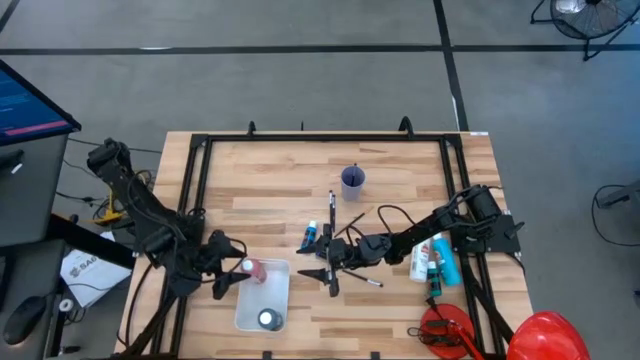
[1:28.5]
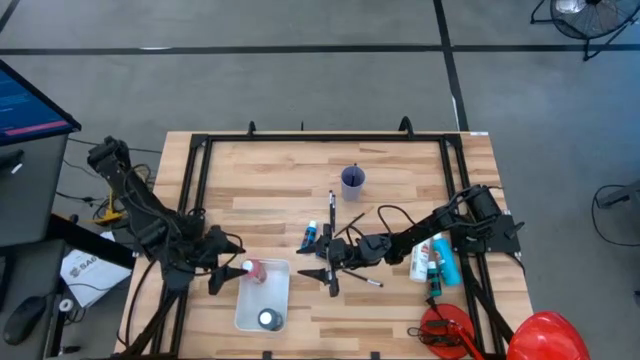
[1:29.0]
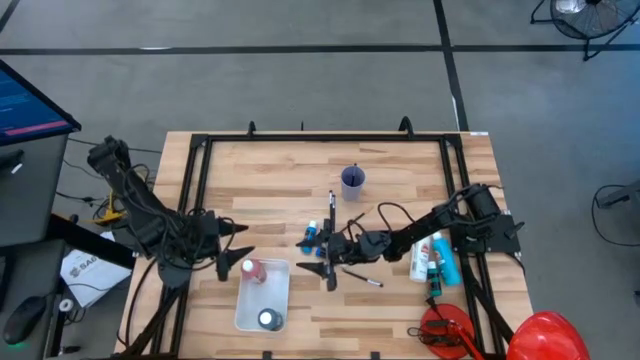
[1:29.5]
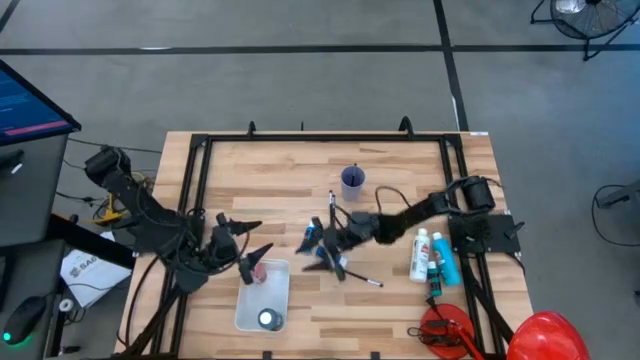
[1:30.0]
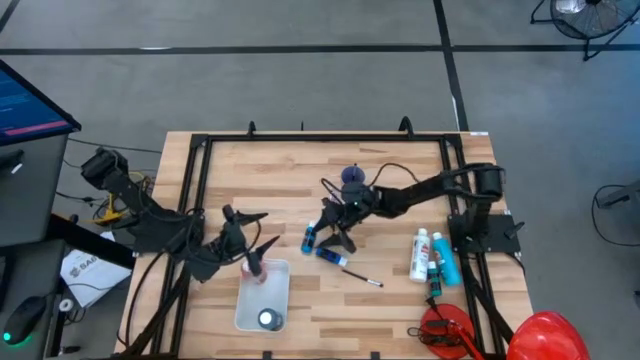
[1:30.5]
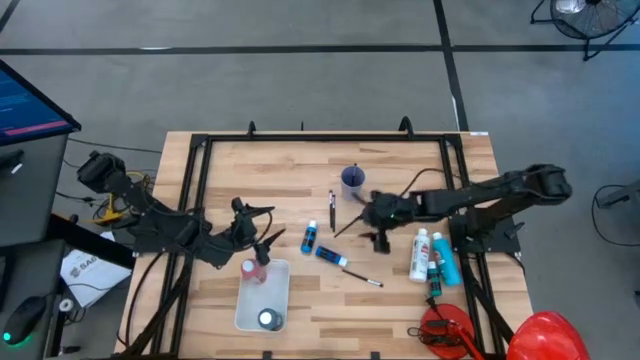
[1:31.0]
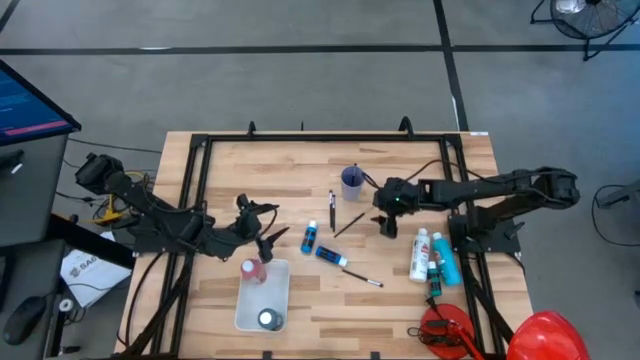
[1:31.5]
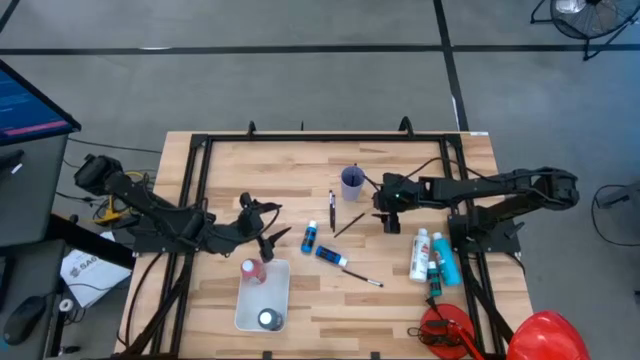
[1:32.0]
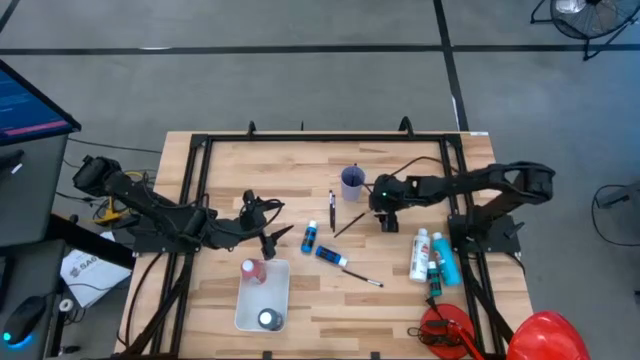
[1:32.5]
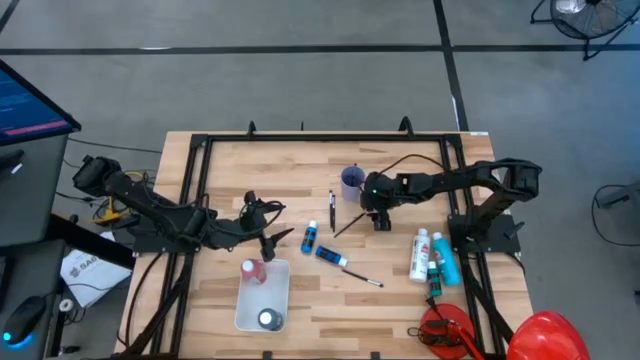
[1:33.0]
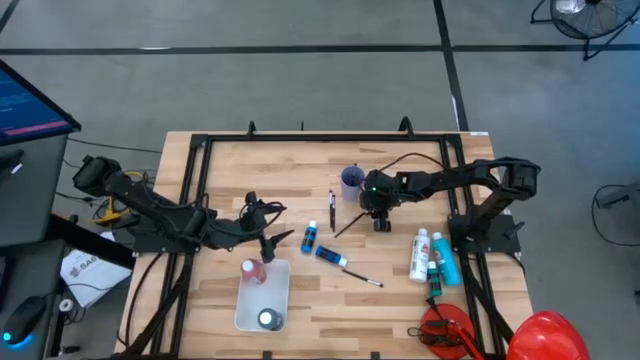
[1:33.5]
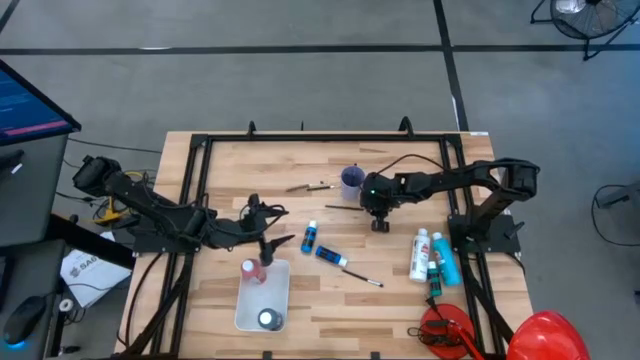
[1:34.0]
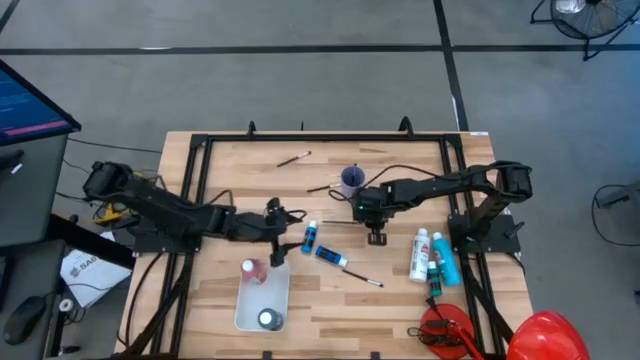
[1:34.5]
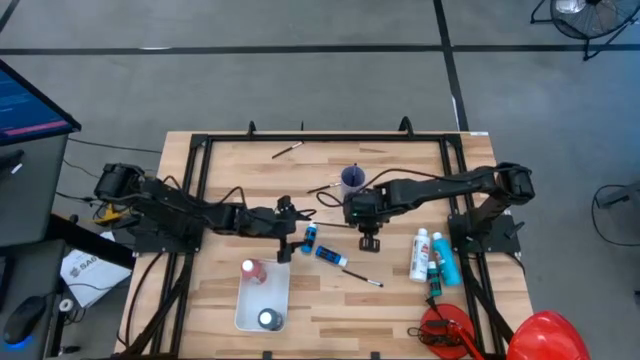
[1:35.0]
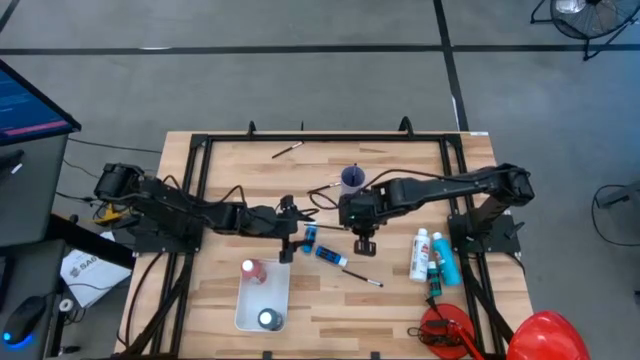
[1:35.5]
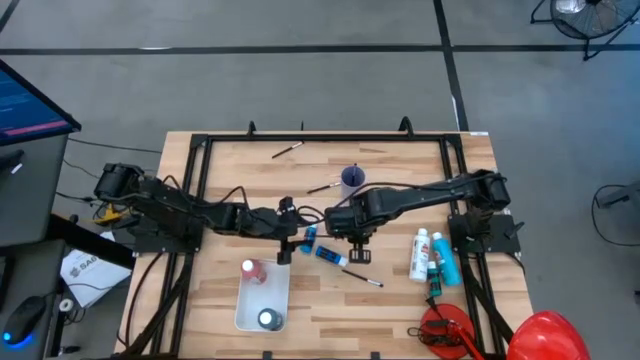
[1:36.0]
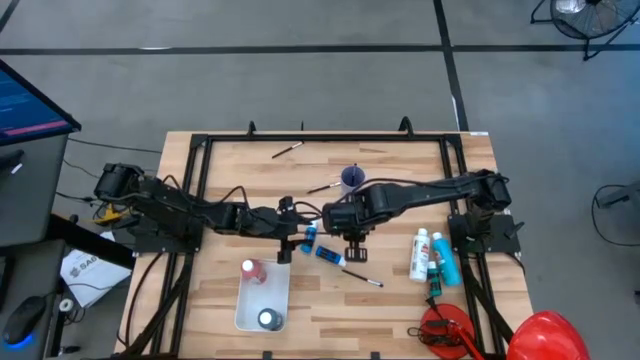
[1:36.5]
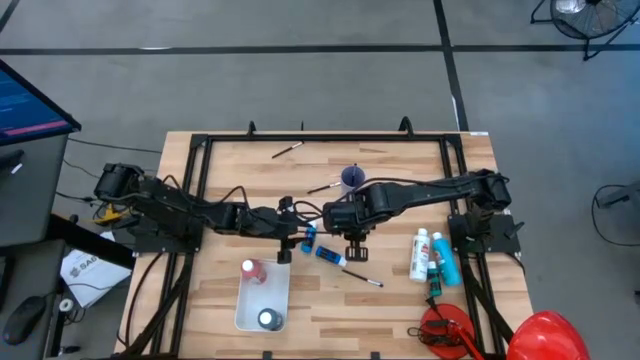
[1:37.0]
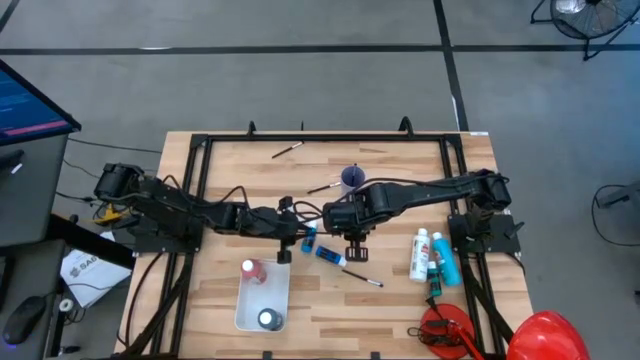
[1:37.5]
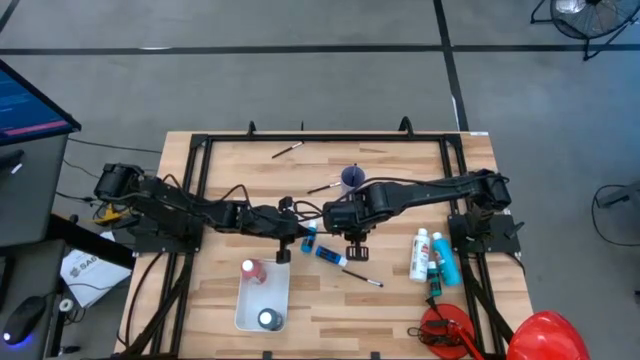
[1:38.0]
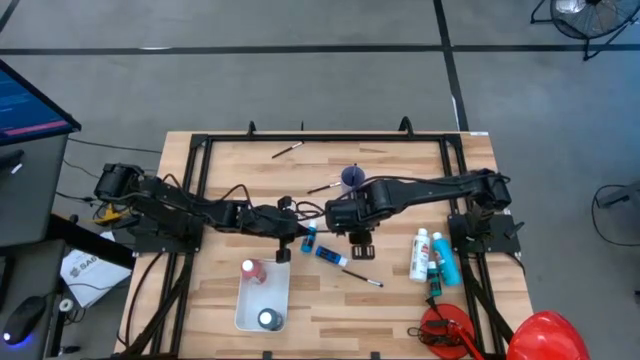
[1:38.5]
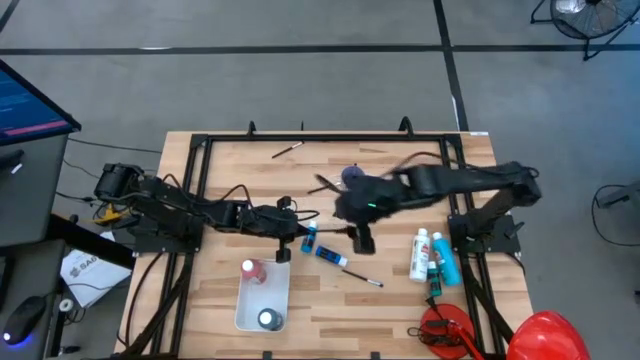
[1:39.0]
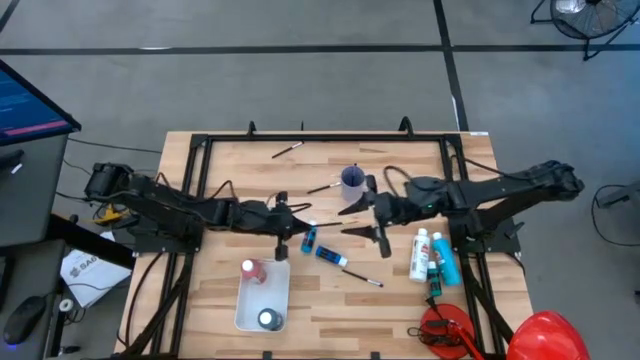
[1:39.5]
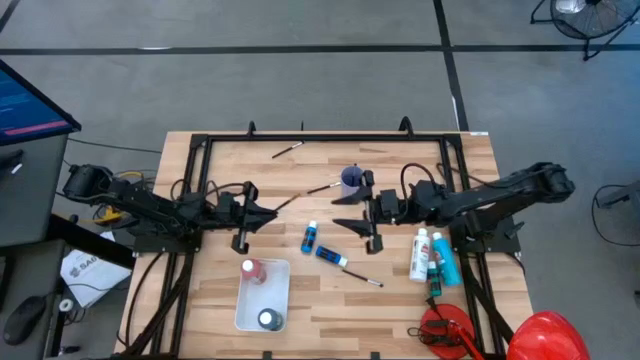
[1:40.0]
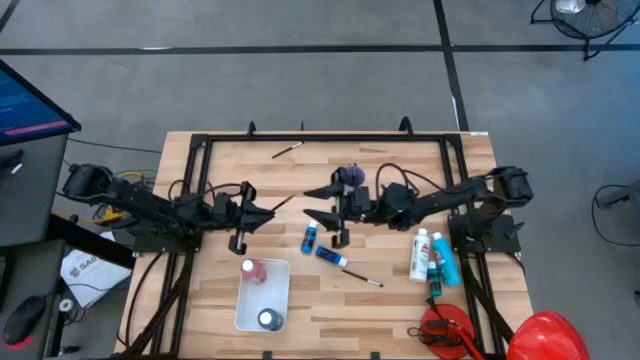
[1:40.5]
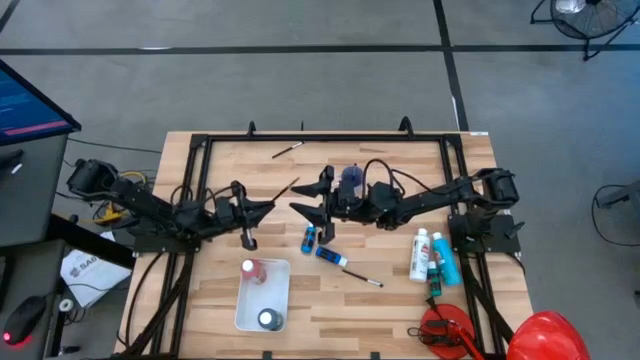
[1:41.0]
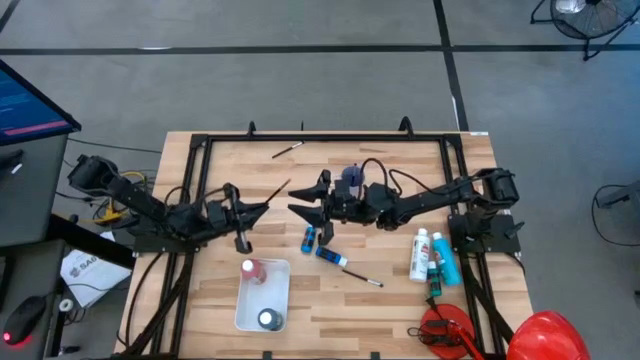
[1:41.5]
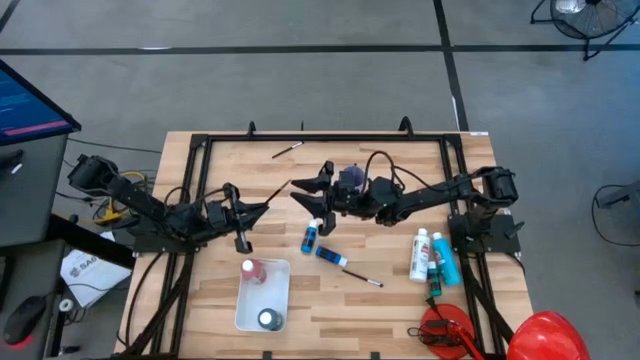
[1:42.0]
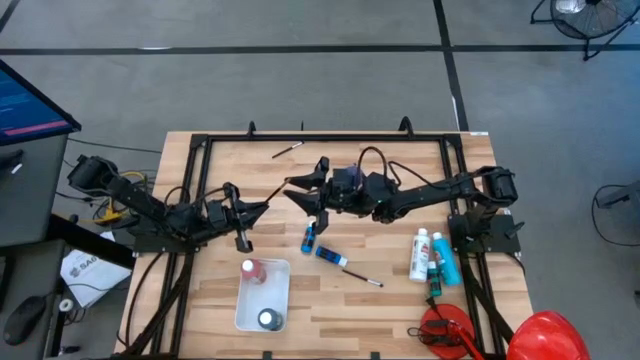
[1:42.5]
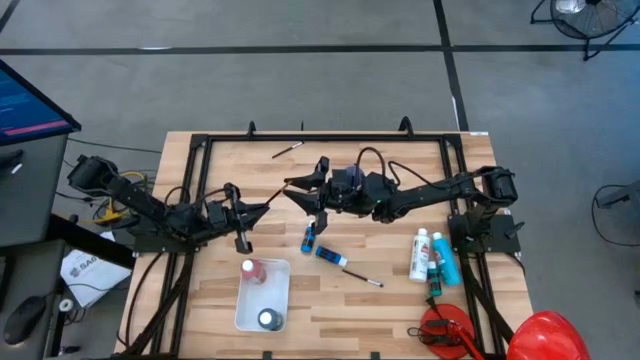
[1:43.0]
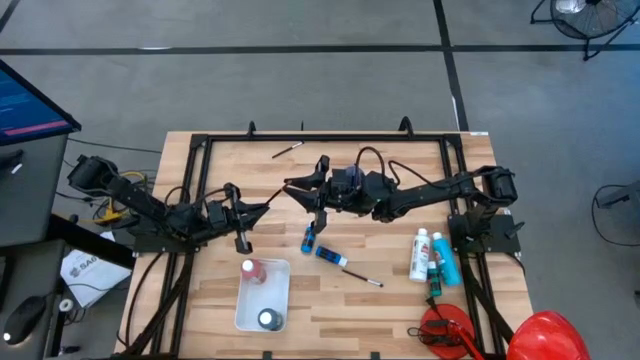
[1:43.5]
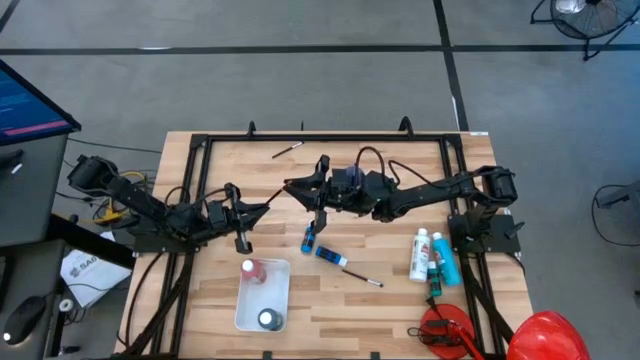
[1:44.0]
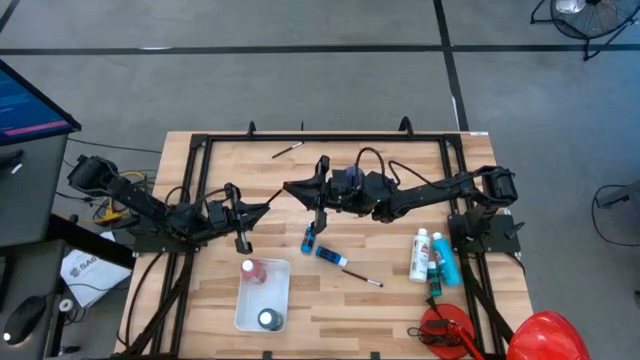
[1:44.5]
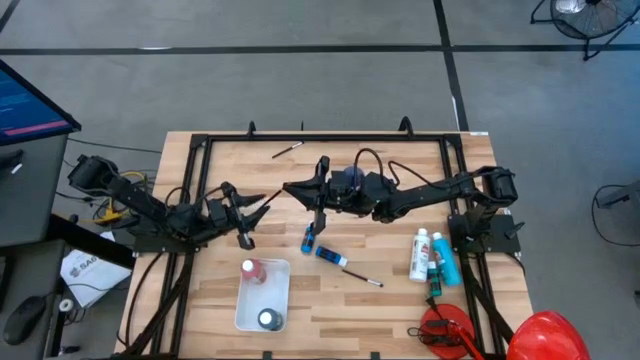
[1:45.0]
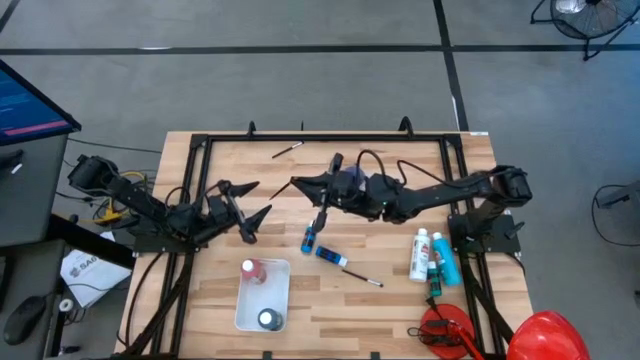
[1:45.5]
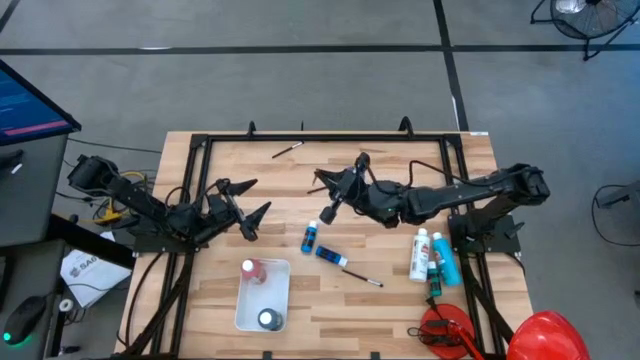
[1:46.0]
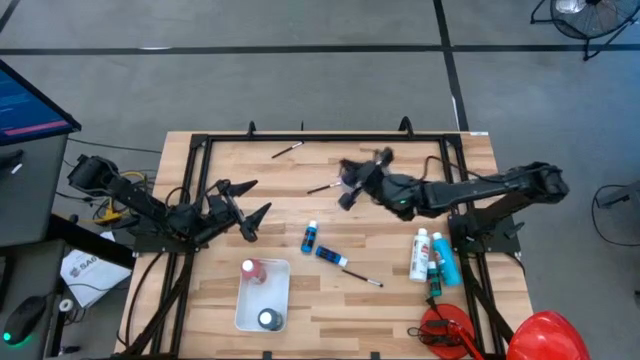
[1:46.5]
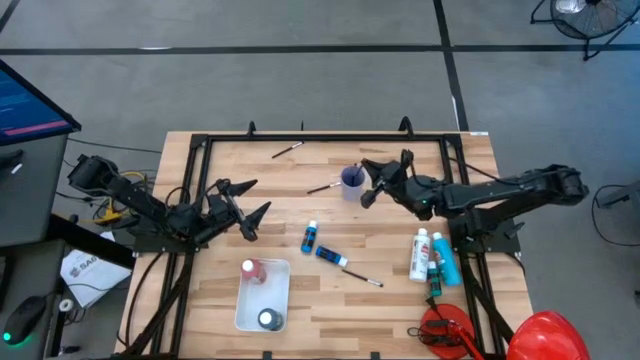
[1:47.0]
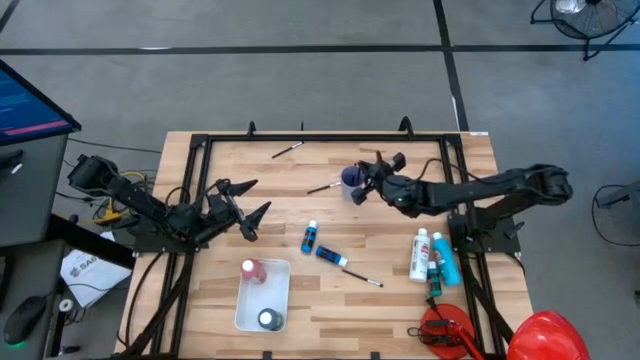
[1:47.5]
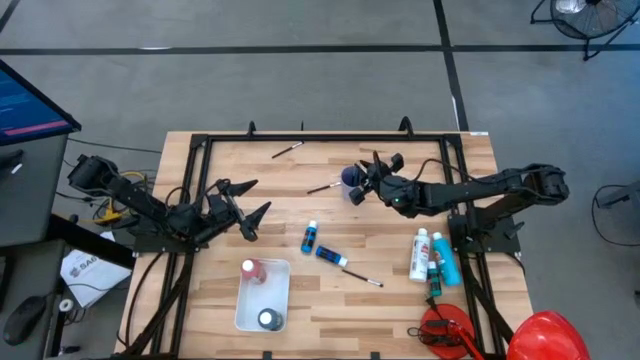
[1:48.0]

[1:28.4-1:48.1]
Task: Pick & Place Paint Supplies
Put the gold paint brush into the violet cup
